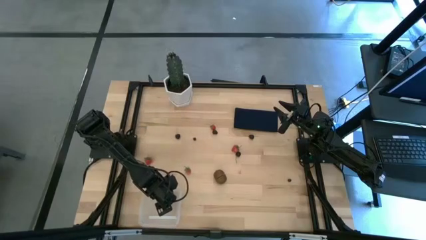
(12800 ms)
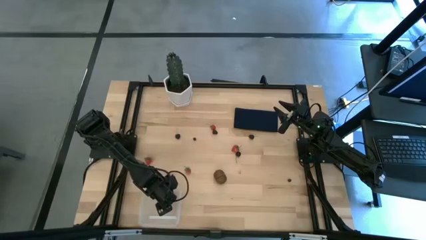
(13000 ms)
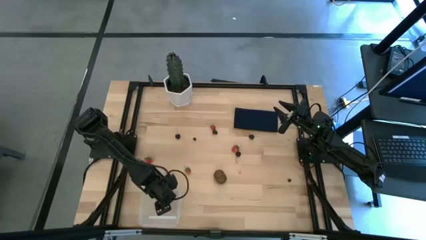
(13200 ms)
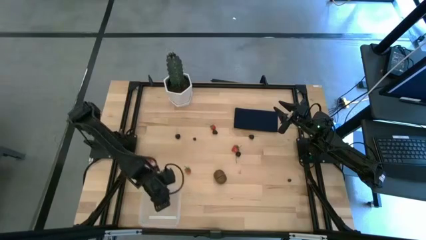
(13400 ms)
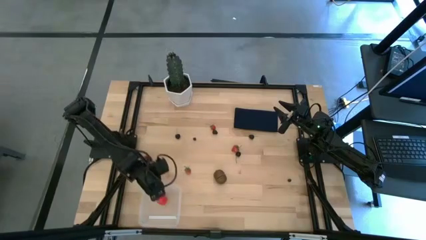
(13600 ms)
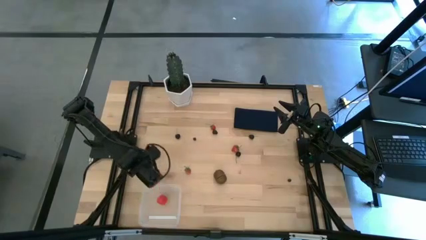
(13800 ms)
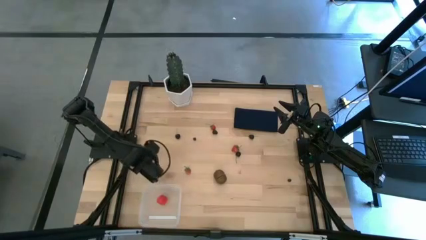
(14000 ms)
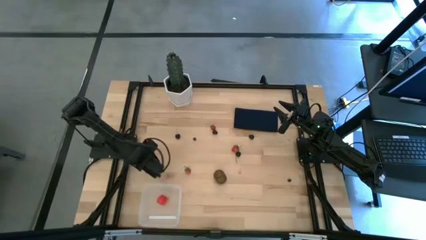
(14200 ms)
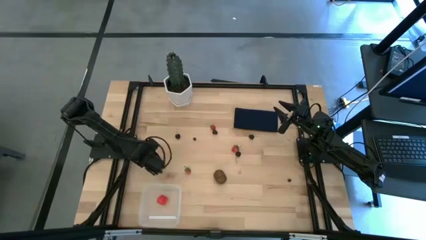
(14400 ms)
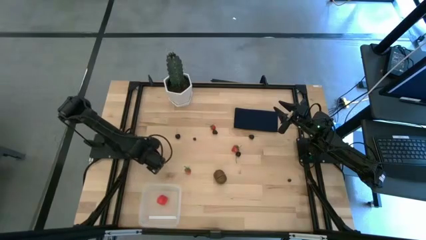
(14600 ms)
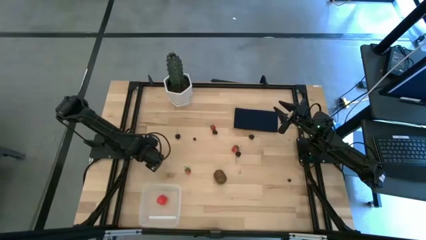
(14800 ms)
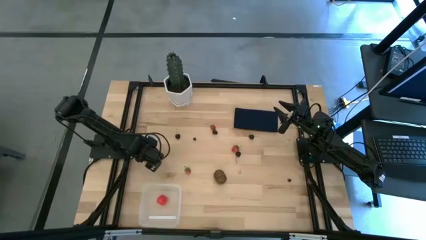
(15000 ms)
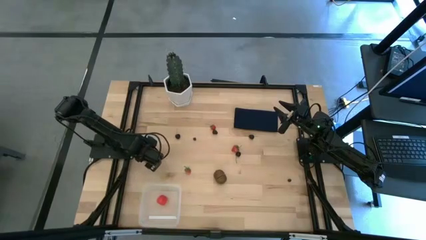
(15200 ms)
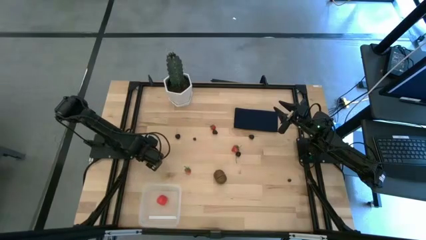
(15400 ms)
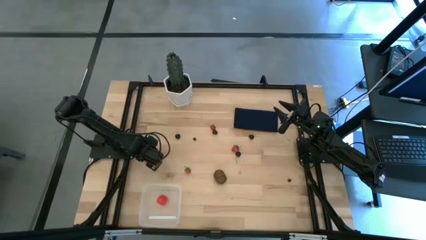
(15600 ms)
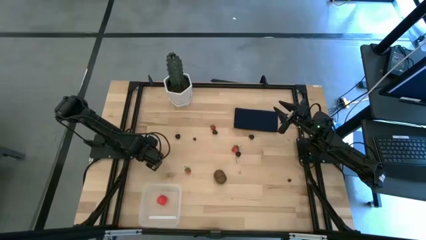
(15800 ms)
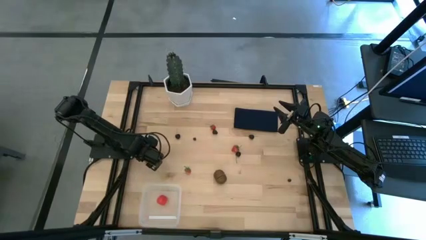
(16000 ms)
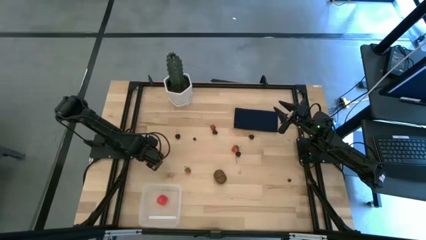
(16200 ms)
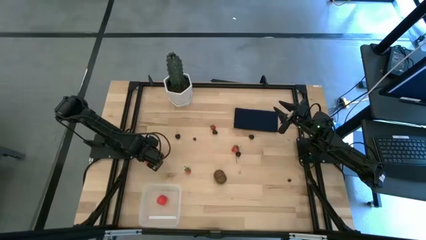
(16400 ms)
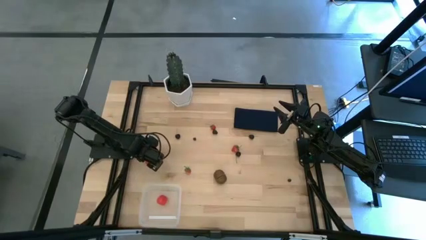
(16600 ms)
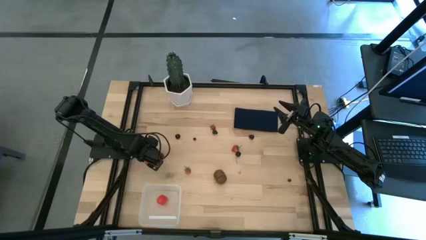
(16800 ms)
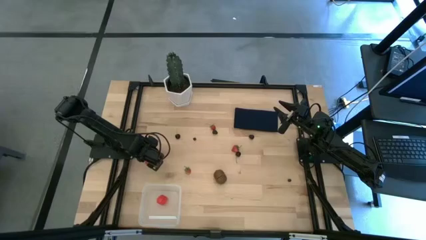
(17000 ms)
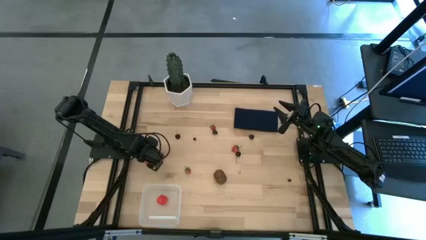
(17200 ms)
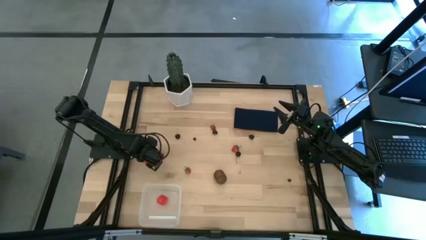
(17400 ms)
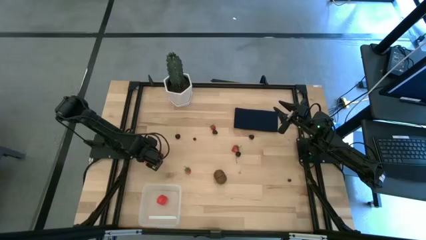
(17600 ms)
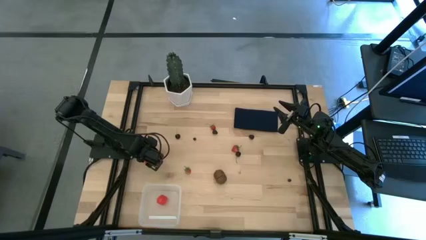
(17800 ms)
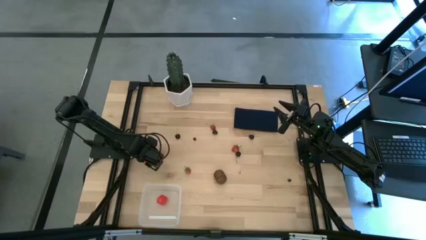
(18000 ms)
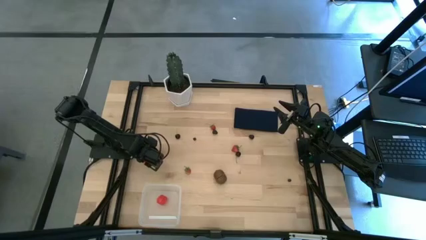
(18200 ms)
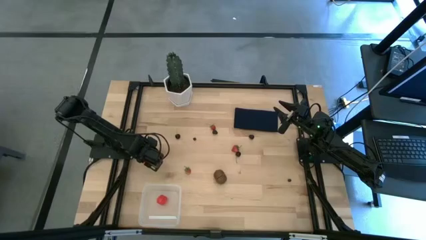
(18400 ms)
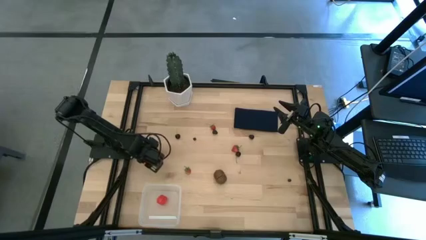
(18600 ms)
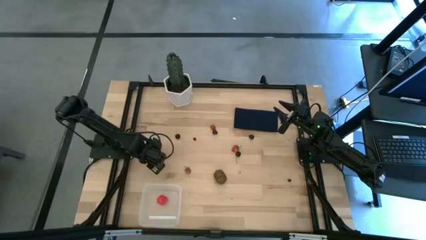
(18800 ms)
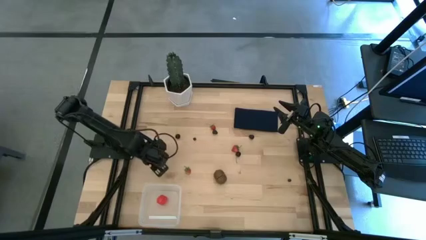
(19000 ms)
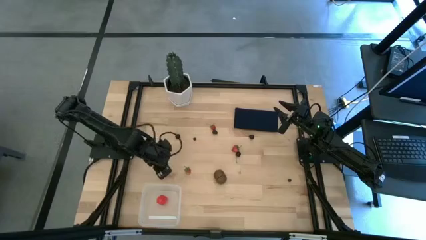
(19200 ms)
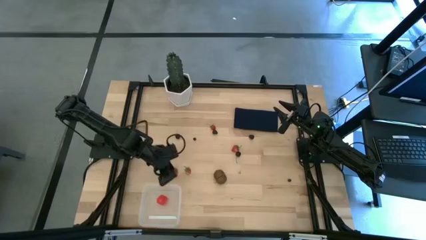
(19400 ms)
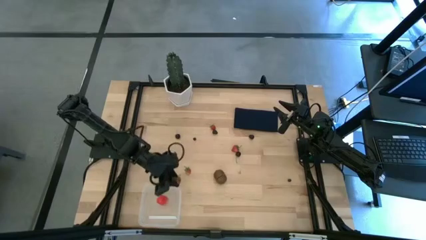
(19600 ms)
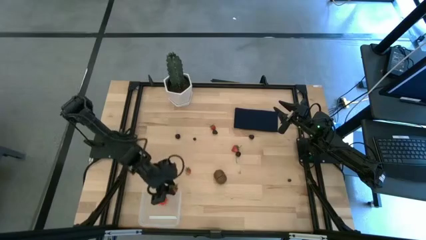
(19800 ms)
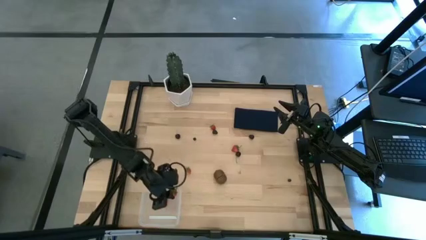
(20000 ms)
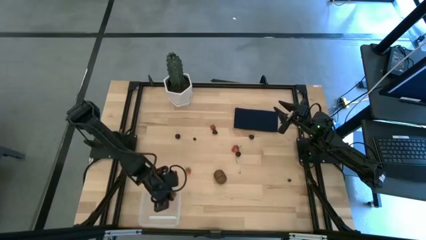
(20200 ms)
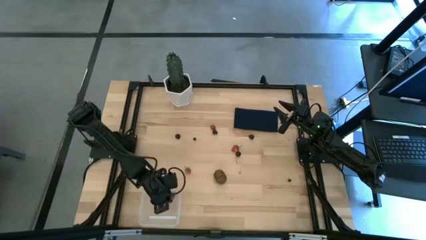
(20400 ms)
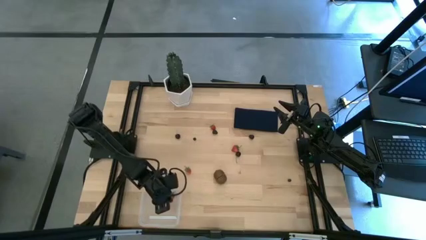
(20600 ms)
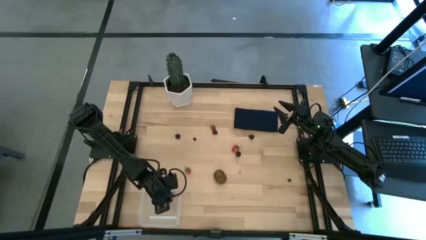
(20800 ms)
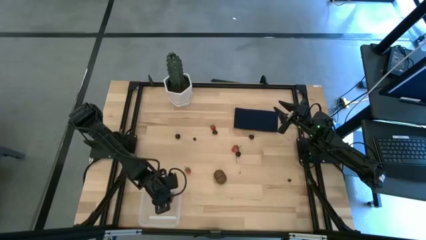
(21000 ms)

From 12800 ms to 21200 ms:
Task: Pick and placing Produce into tupperware
Put the strawberry in the transparent bin

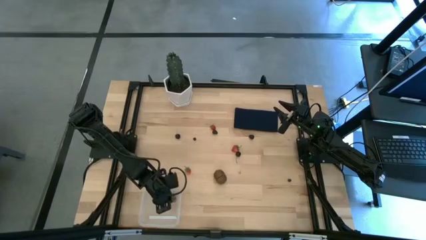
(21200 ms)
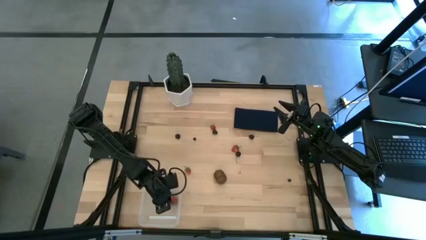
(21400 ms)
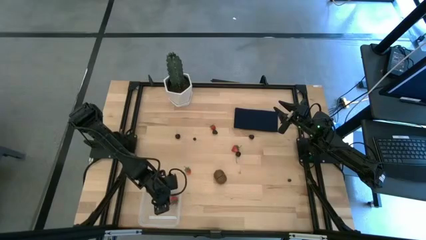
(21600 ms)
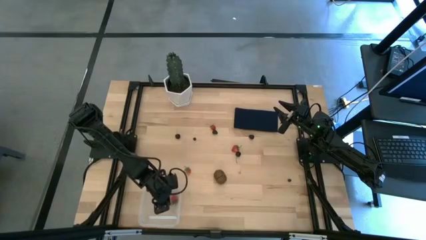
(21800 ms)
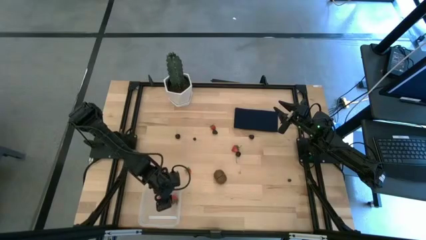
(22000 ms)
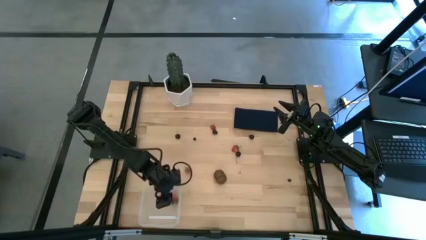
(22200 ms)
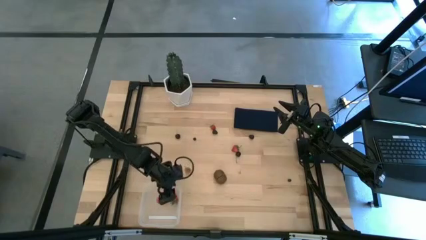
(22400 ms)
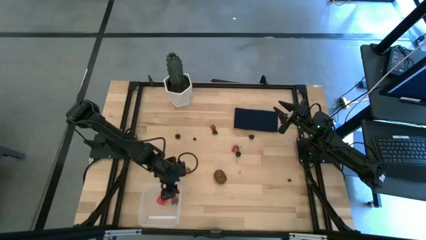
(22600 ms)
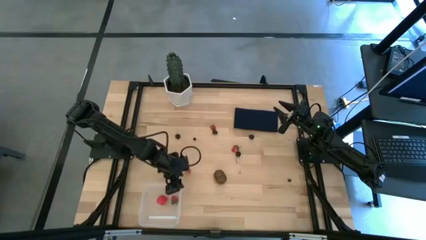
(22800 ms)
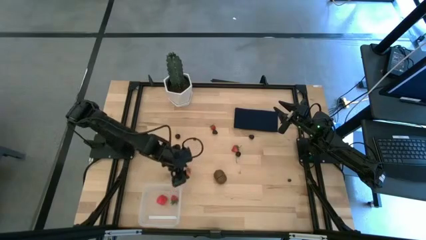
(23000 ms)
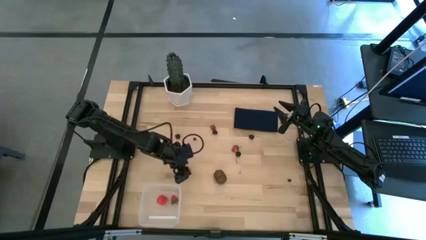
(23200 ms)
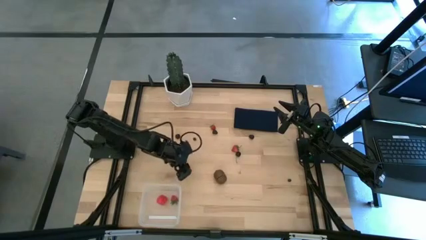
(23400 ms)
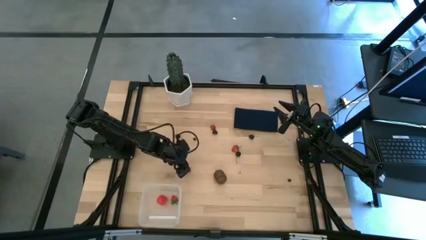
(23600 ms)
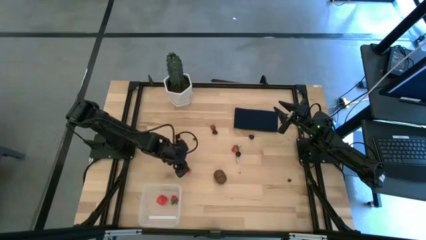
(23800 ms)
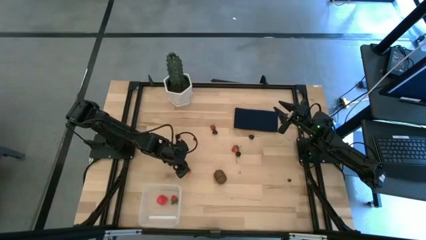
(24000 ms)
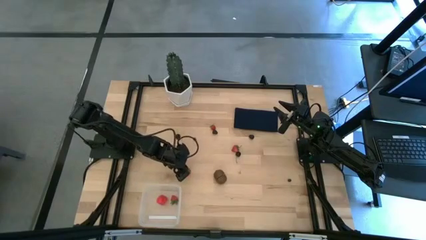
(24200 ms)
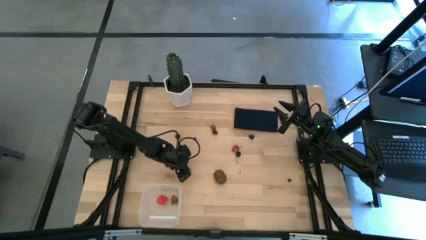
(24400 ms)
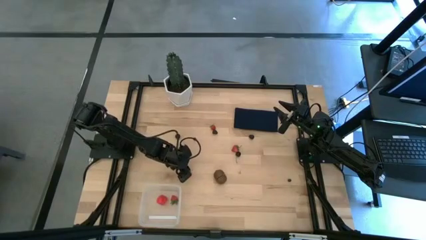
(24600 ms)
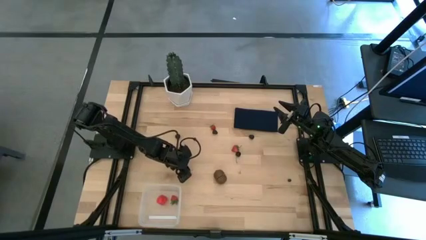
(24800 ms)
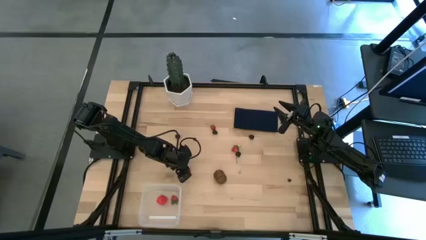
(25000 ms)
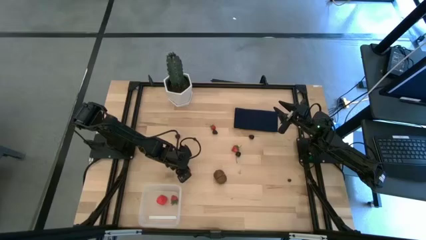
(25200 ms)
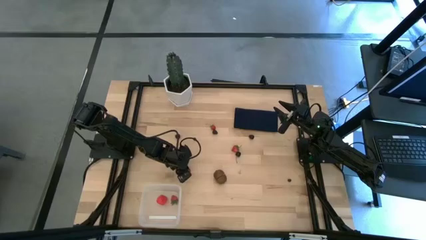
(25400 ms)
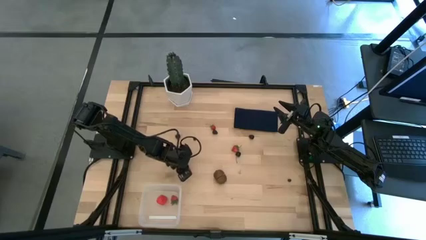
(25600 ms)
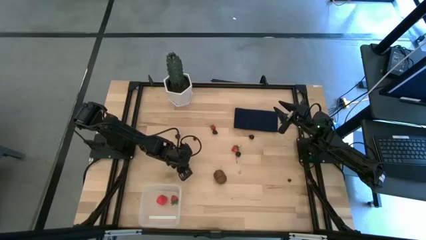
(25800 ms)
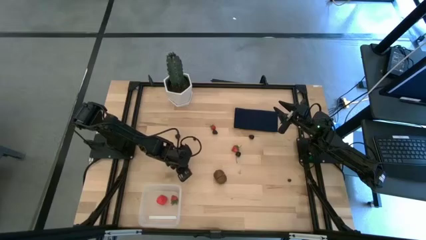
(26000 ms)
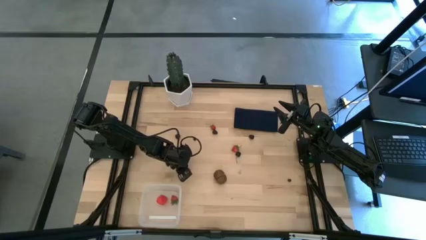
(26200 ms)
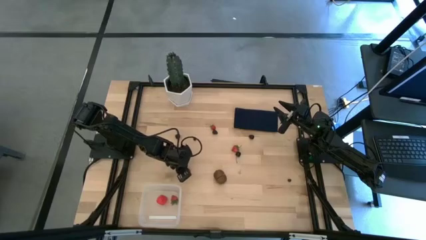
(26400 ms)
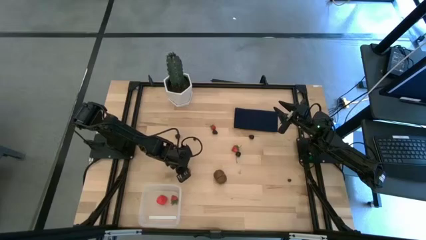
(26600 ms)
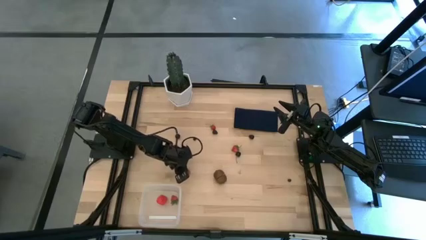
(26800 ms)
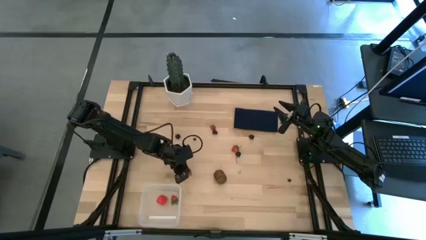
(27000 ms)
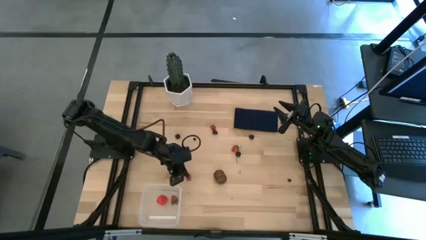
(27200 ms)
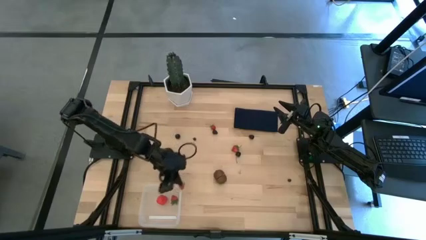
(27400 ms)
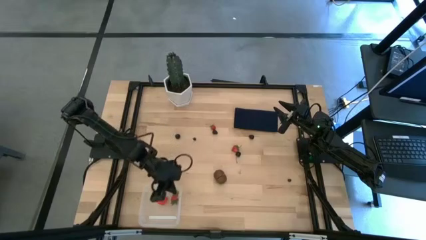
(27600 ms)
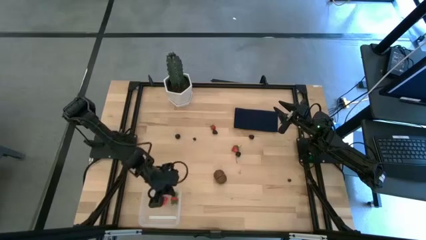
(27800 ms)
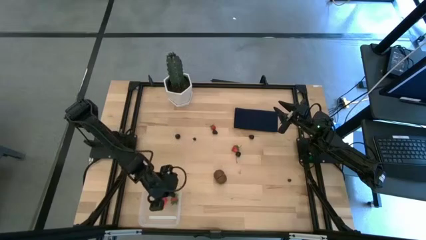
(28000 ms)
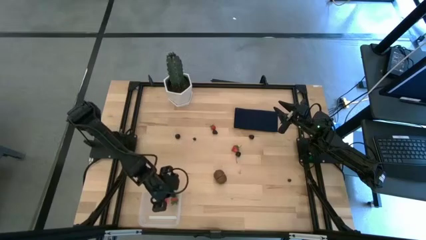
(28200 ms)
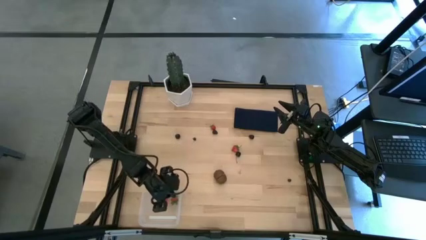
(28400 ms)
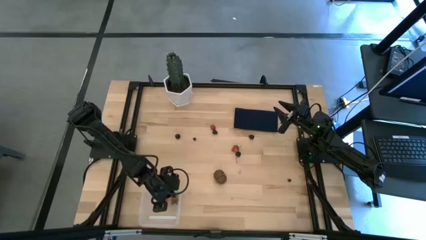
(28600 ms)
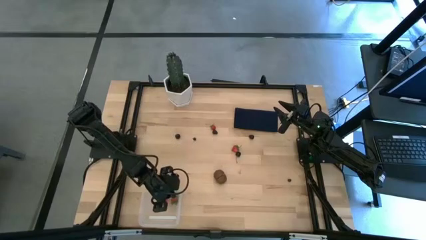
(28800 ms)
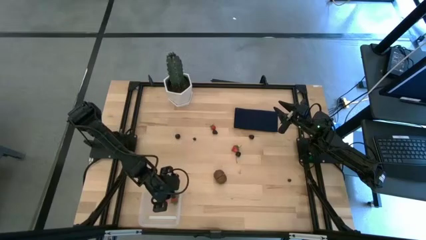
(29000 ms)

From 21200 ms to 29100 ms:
Put the strawberry in the transparent bin

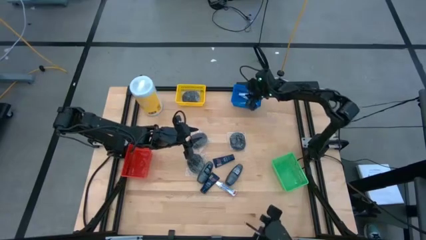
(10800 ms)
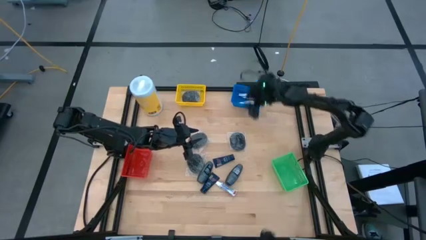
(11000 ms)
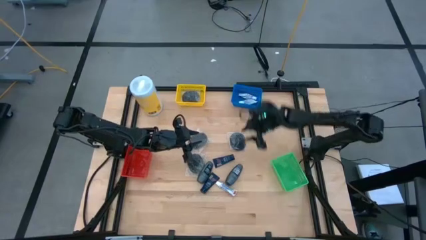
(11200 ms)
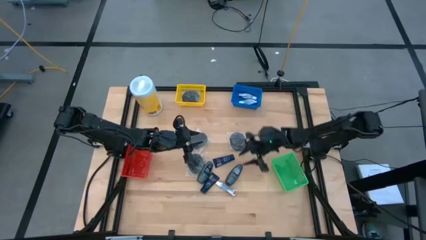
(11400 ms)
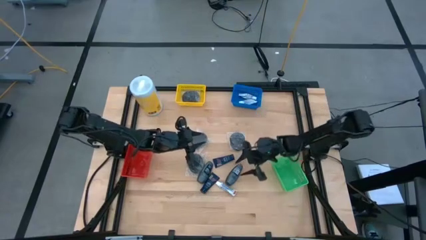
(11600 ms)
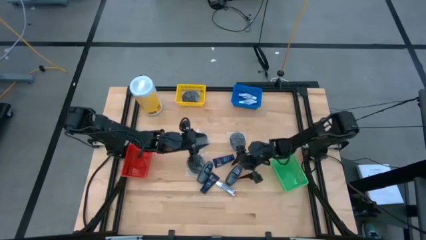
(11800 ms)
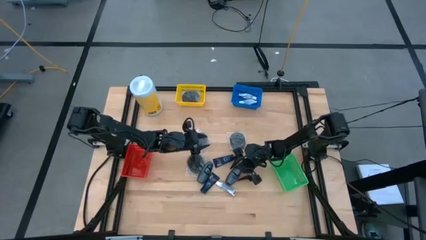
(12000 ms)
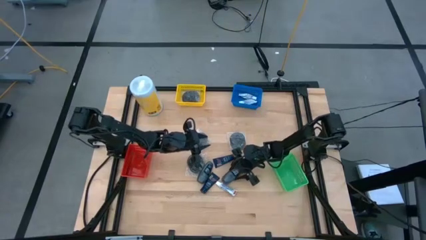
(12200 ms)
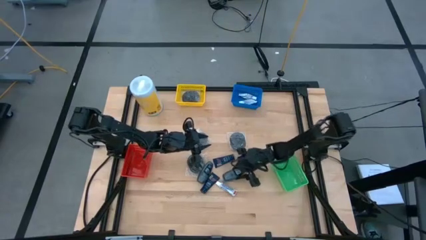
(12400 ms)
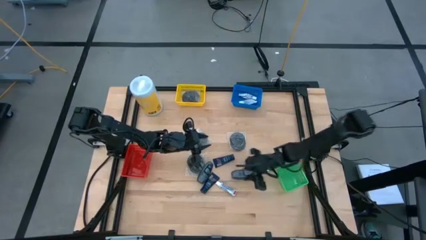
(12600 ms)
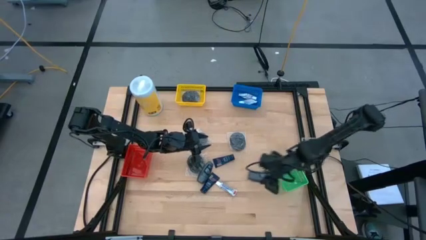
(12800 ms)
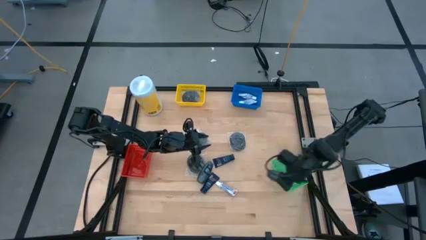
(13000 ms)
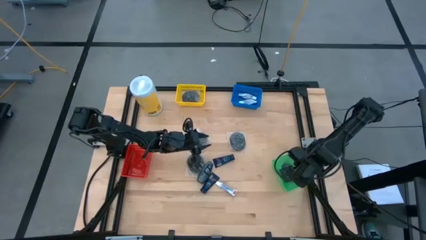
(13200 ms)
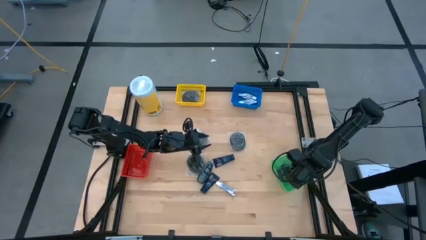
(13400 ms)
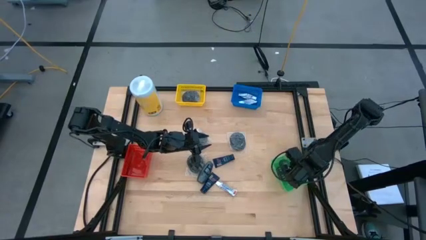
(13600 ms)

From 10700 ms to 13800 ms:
Task: Pick & Place Travel size toiletries
Put the gray deodorant into the green bin
